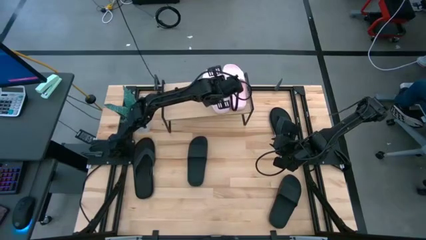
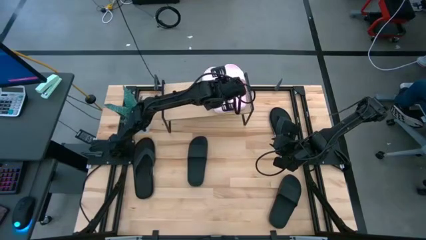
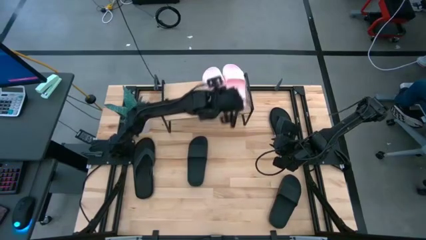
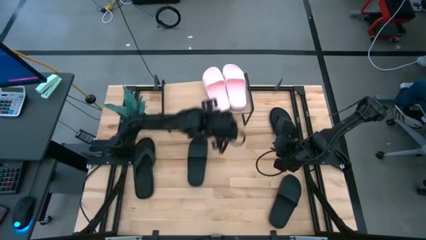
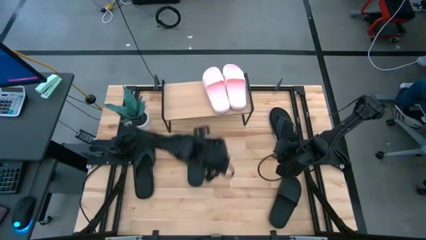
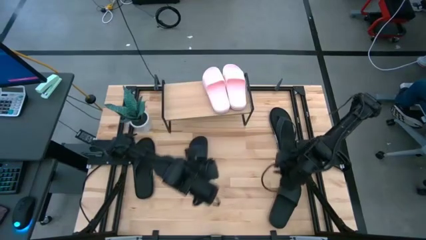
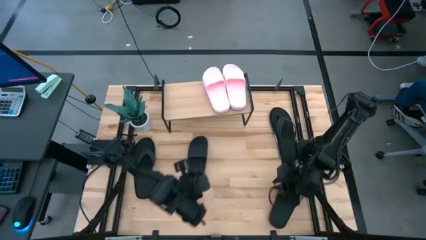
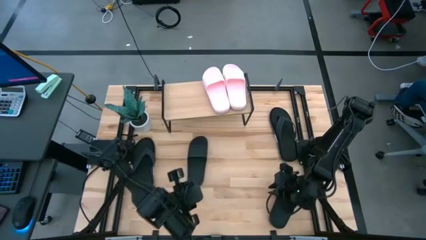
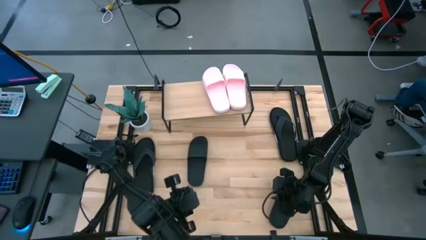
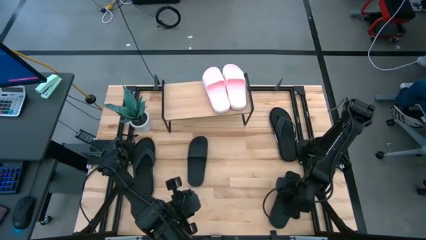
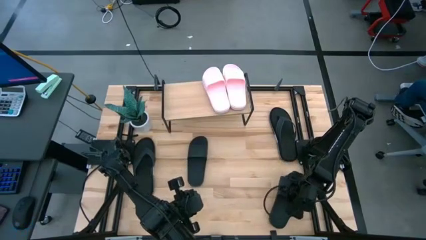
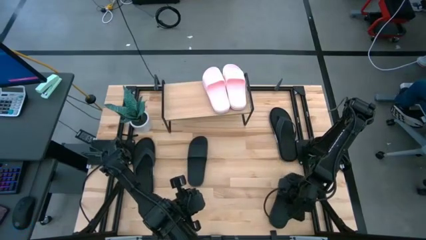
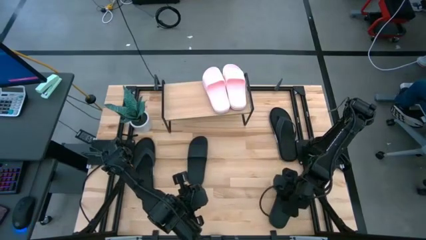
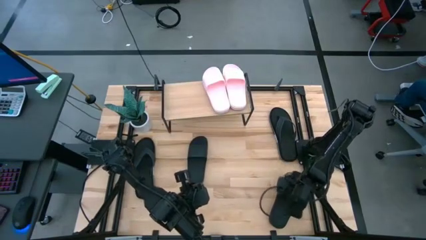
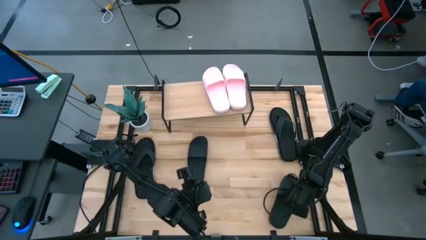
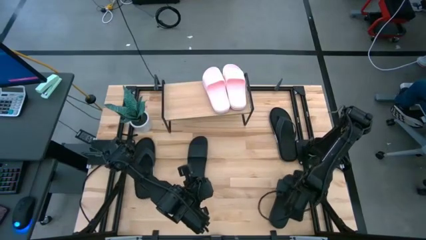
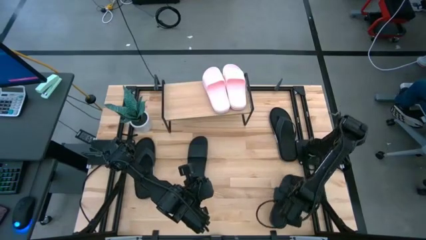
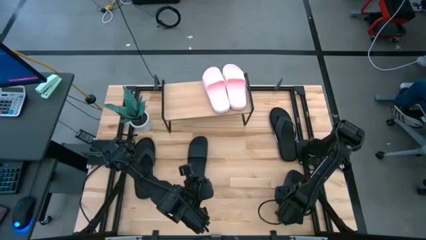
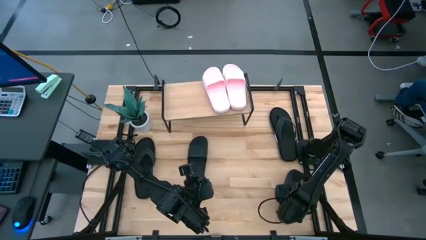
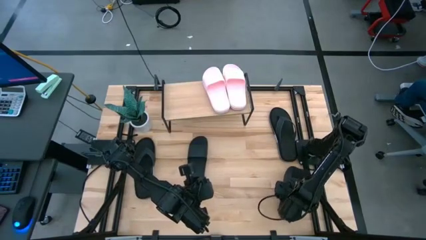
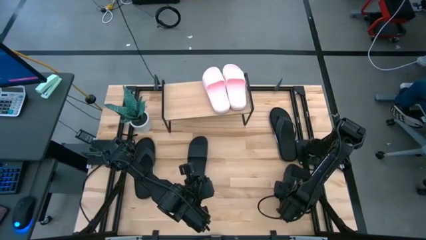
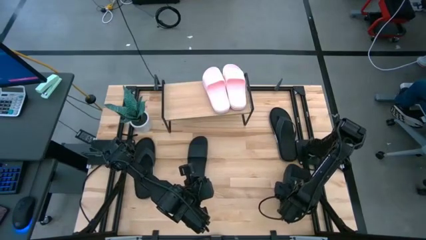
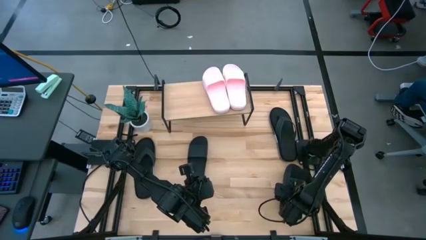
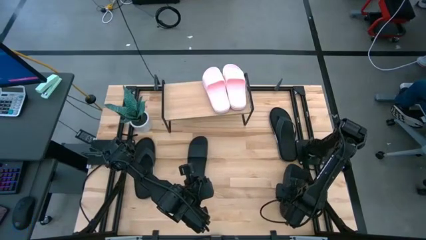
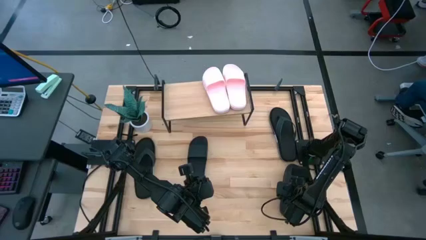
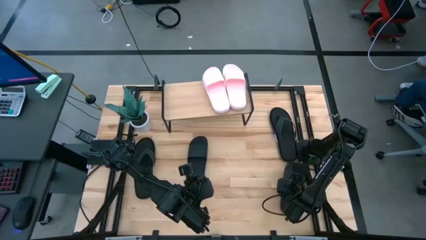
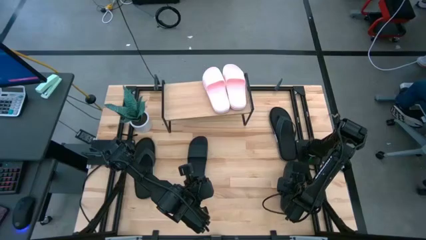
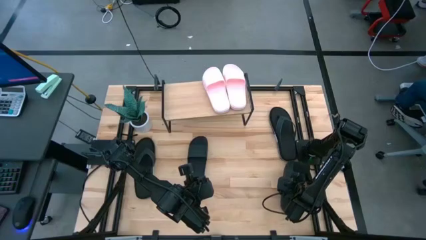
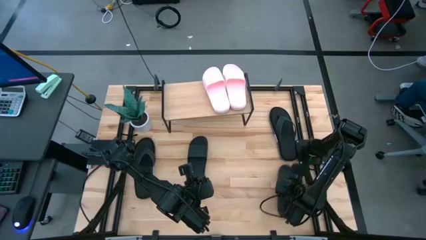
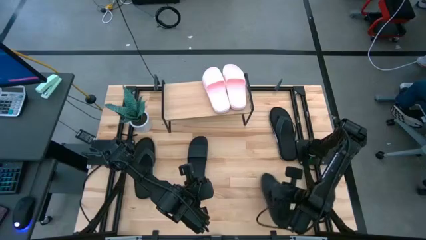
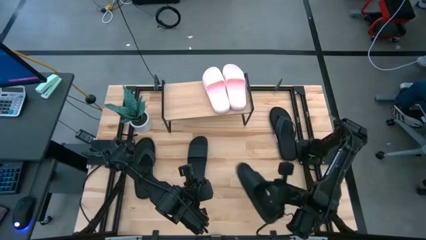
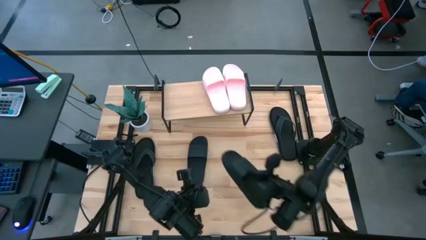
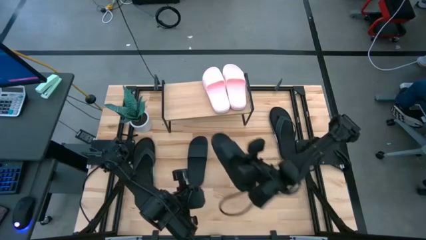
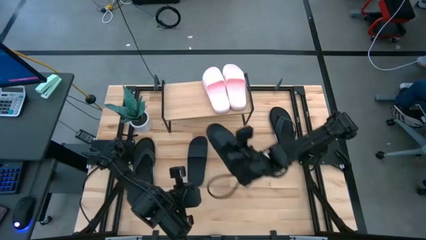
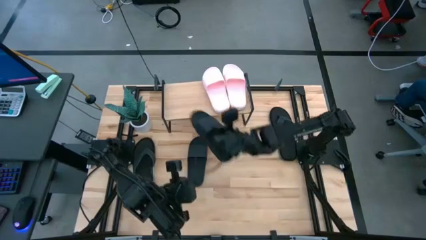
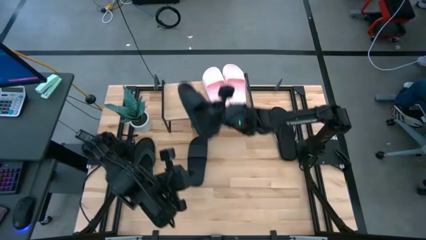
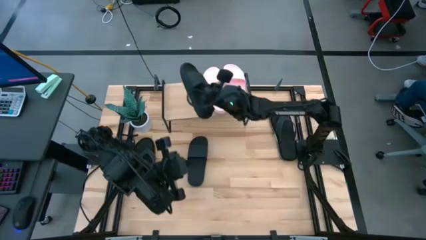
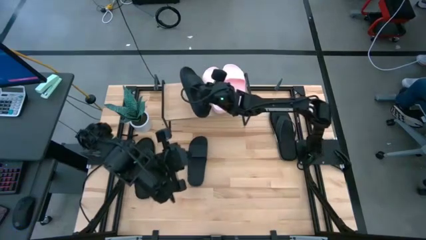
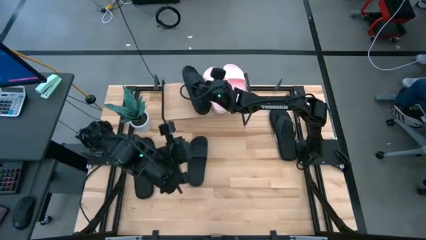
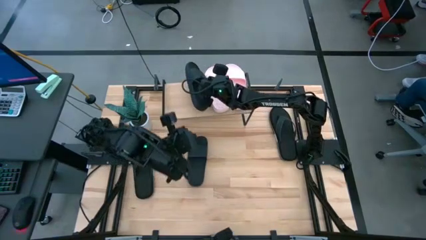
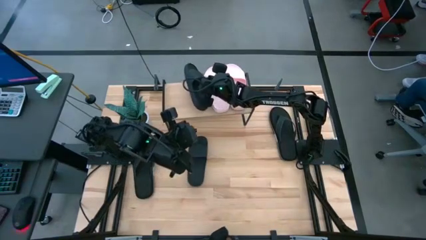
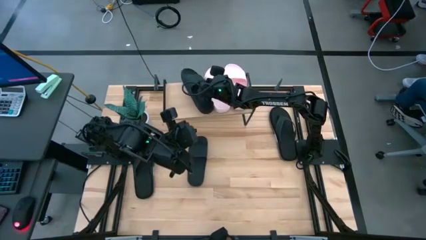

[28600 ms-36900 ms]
Task: Pick and place slides into the shelf
Put the right black slide on the shelf

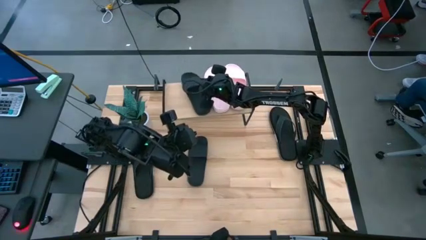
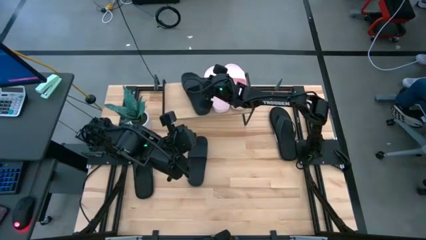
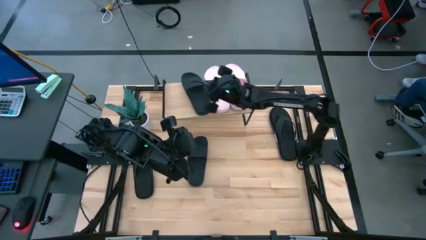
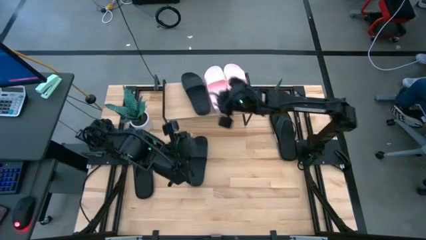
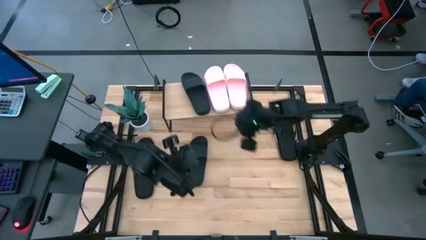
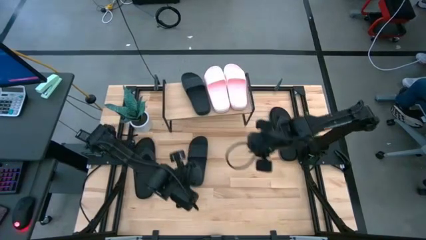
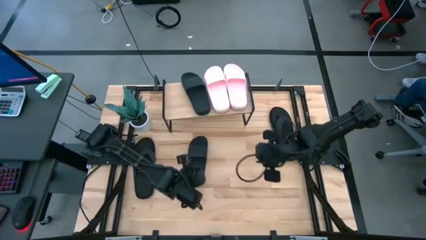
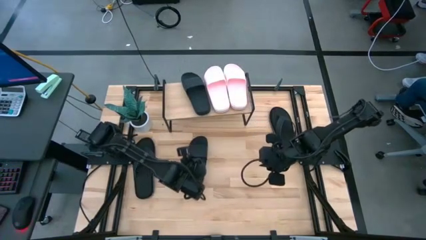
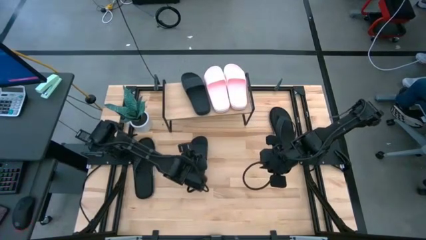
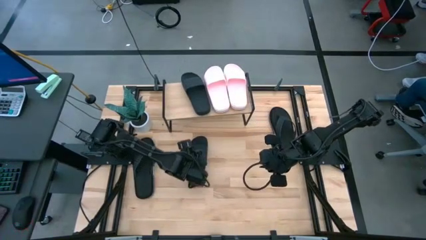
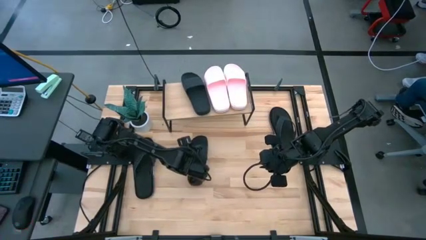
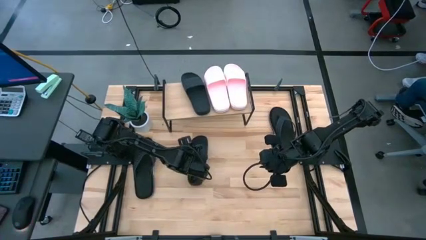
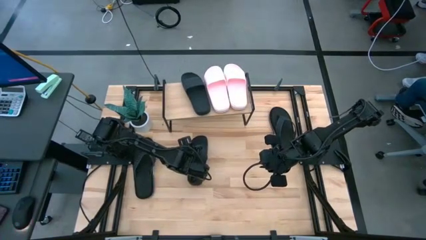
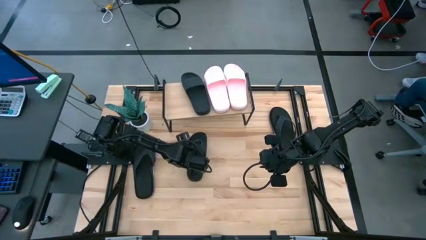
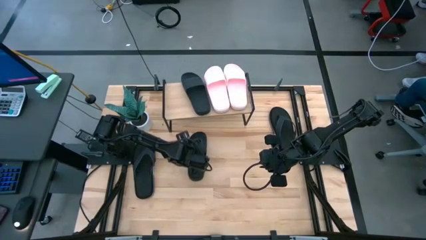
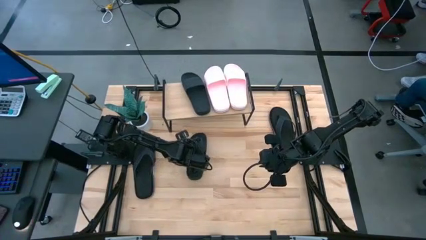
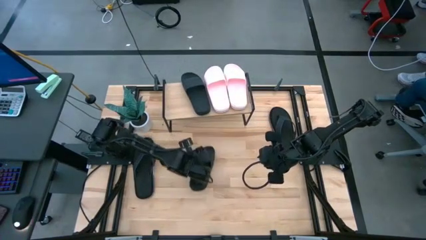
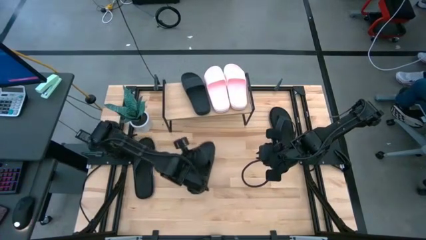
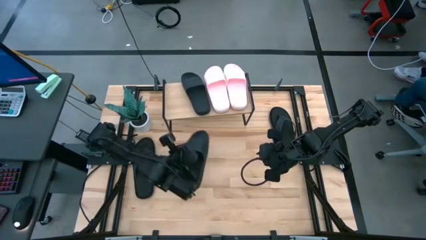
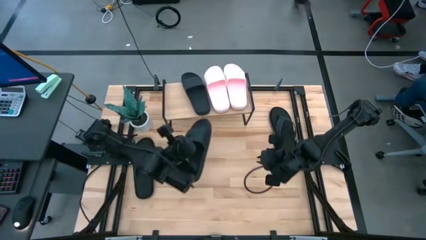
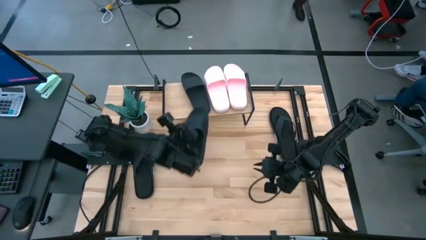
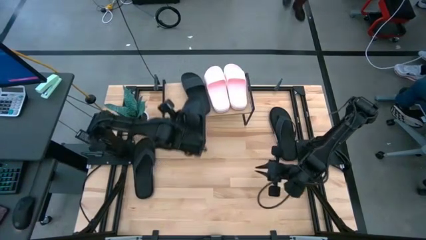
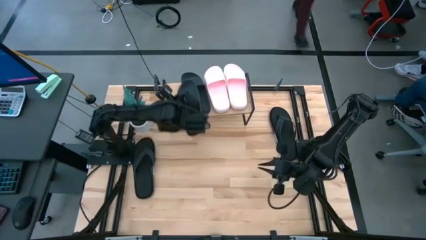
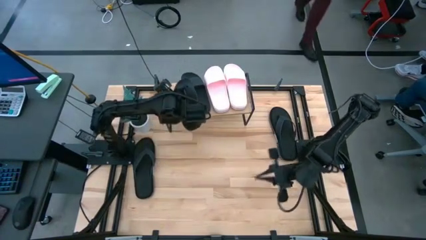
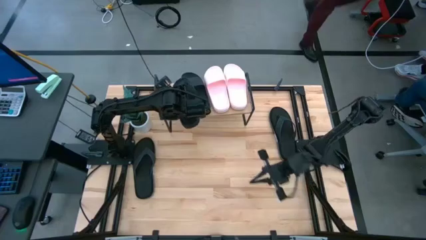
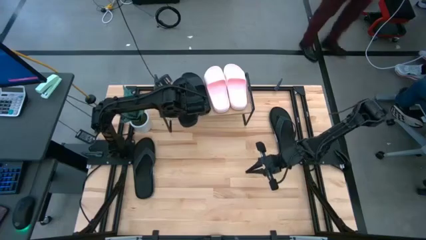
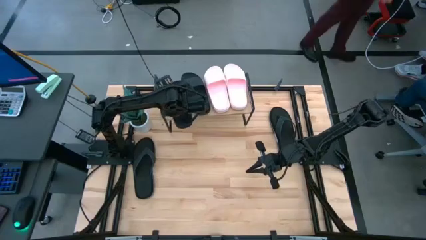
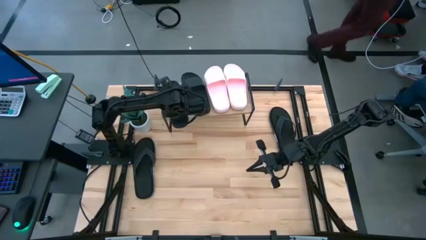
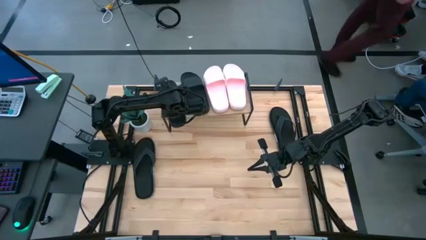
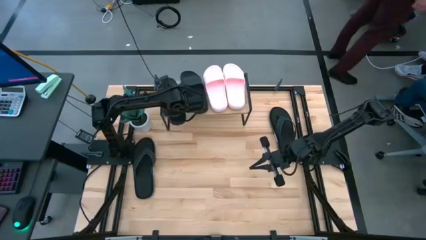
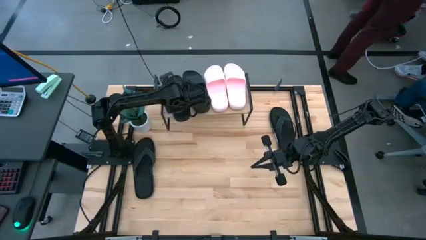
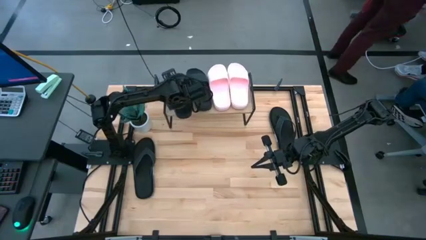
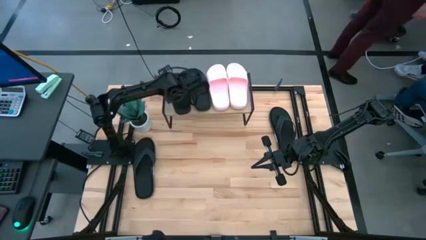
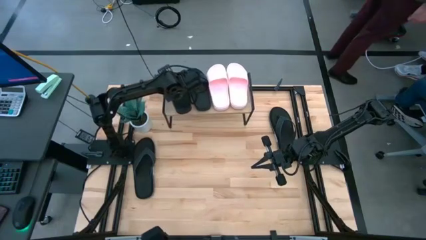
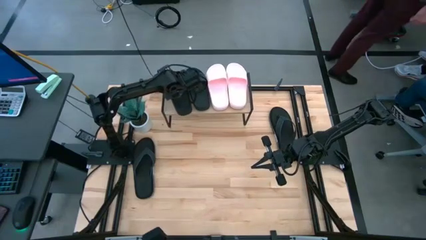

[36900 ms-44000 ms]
Put the black slide on the shelf

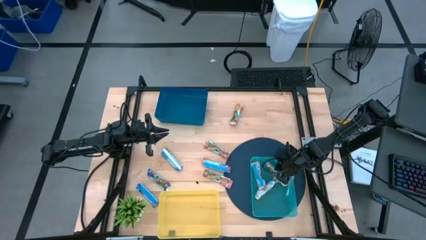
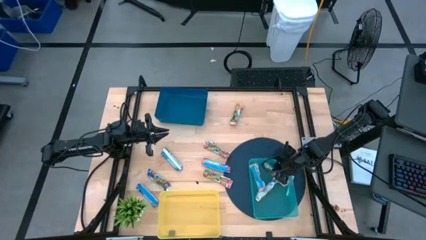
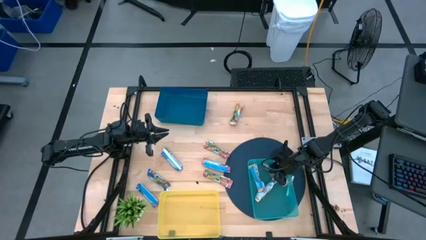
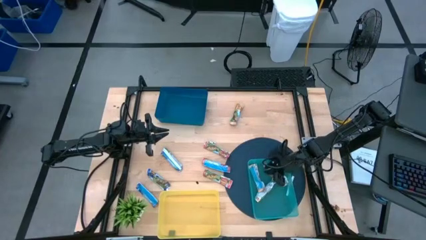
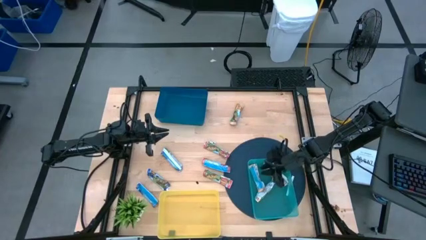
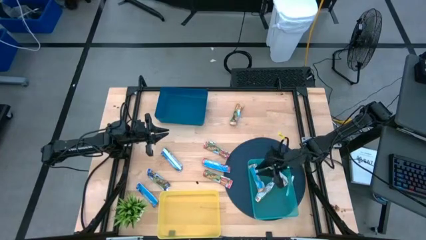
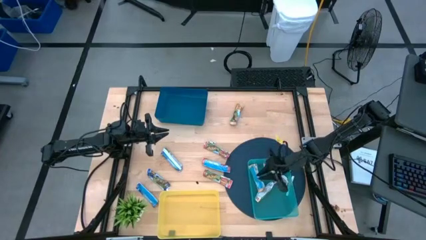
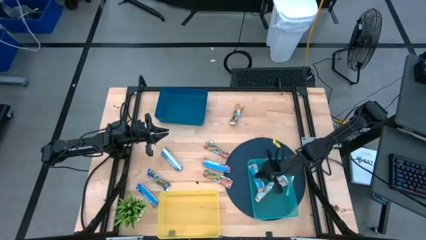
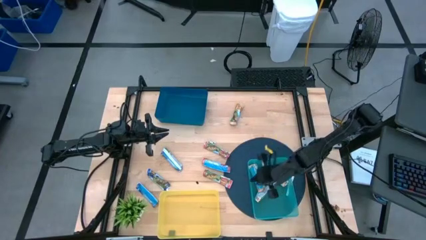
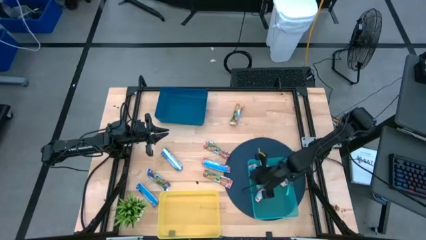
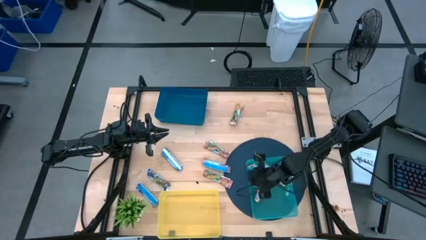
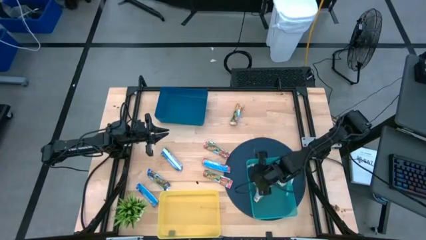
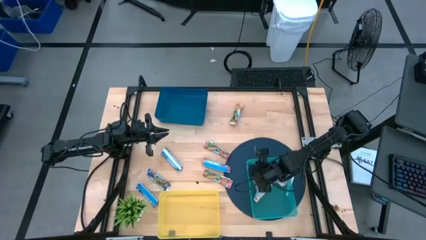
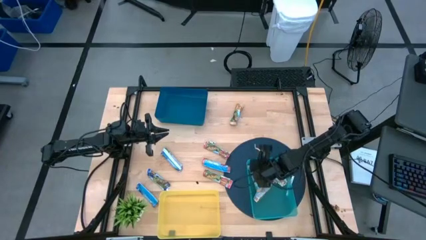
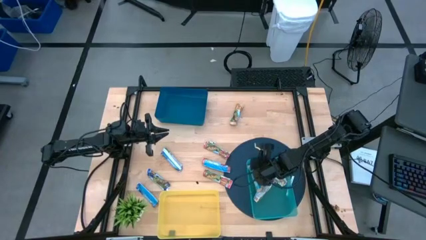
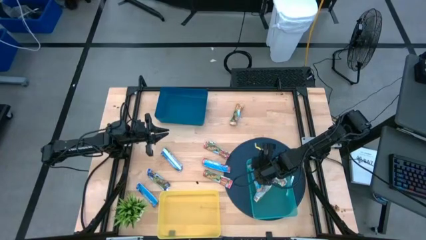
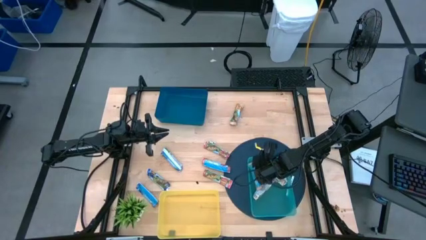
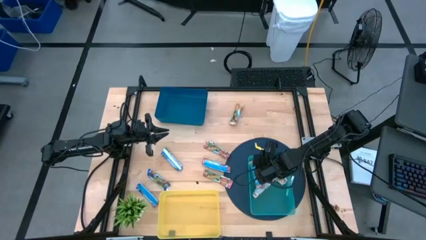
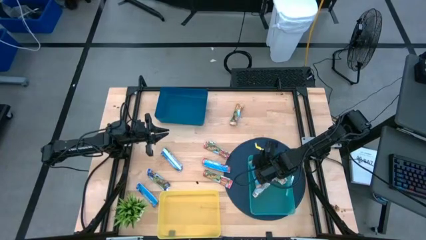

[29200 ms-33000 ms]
Task: Pick and place Granola Bars by type
Adjust the green bin
